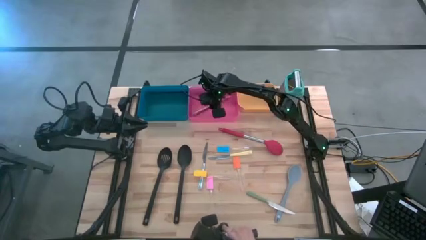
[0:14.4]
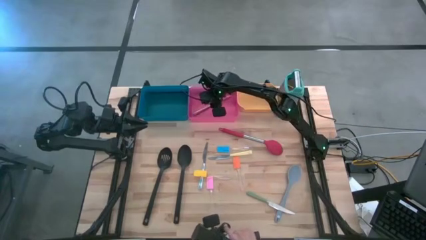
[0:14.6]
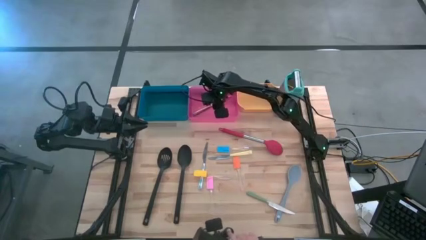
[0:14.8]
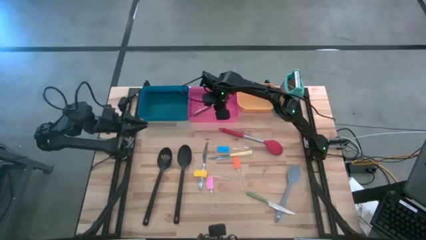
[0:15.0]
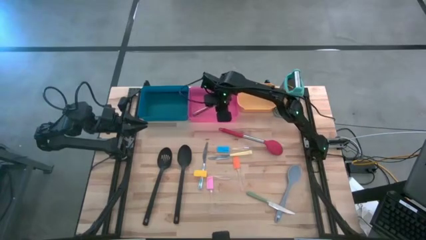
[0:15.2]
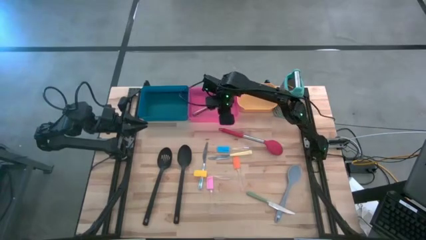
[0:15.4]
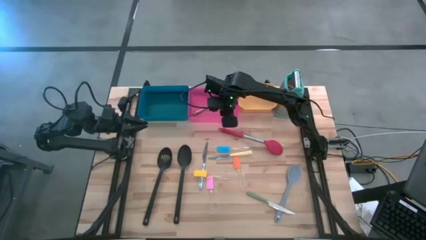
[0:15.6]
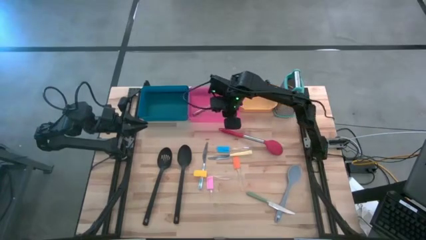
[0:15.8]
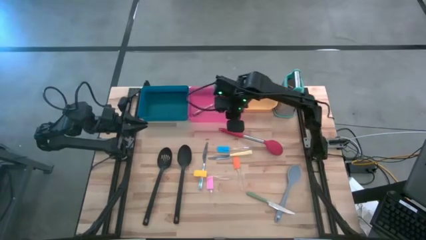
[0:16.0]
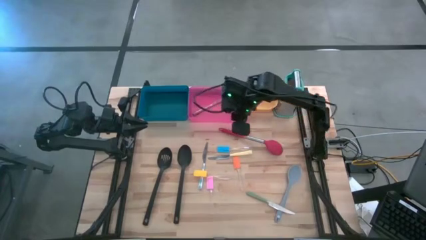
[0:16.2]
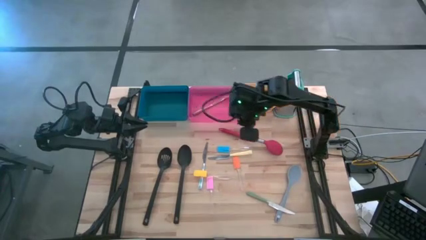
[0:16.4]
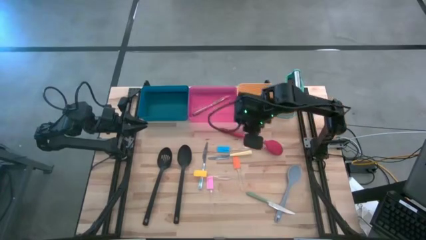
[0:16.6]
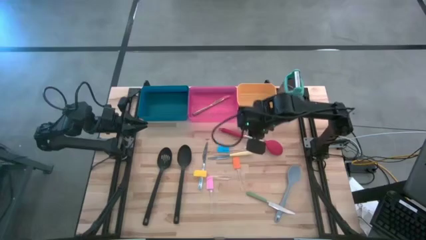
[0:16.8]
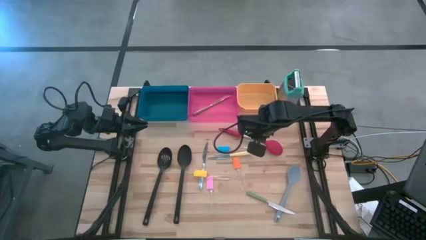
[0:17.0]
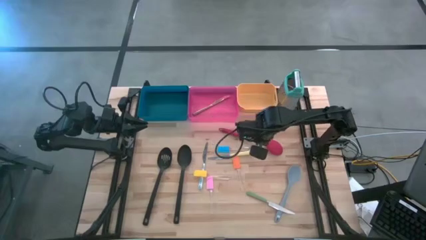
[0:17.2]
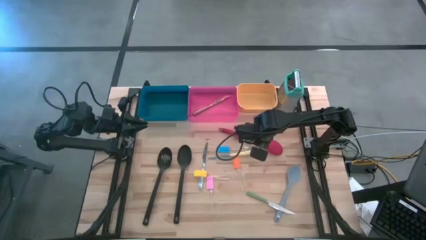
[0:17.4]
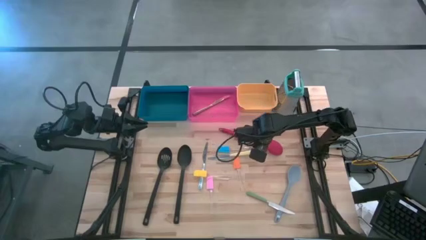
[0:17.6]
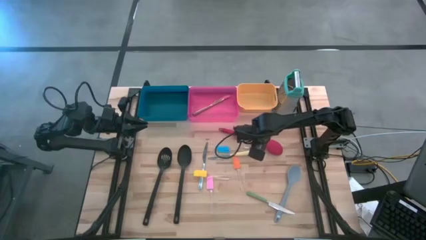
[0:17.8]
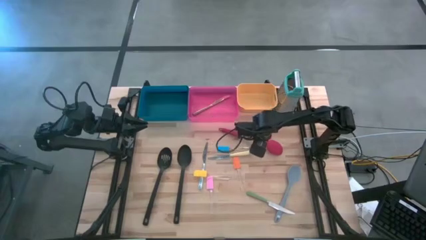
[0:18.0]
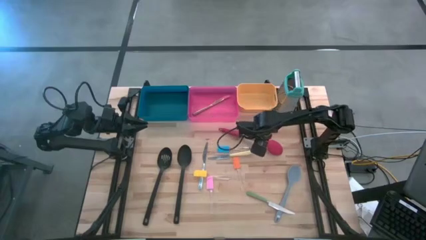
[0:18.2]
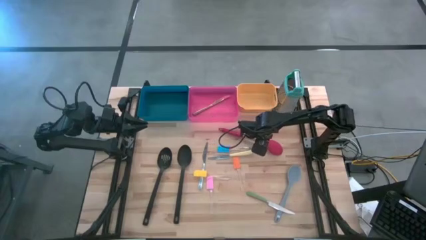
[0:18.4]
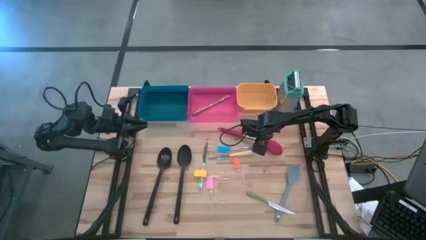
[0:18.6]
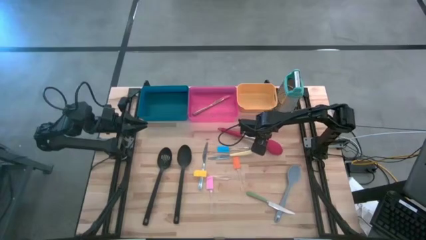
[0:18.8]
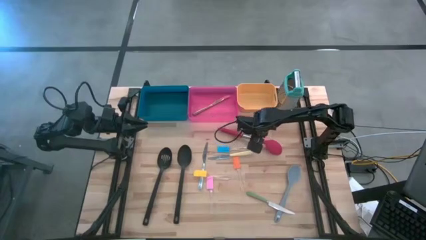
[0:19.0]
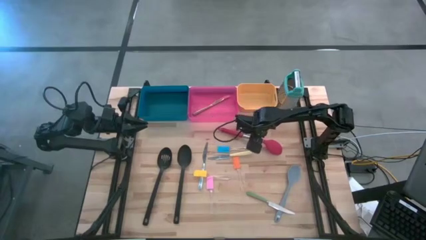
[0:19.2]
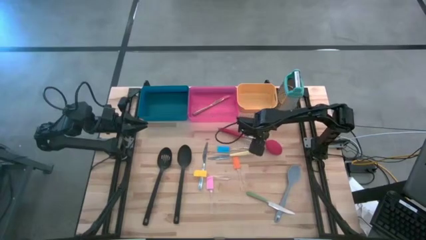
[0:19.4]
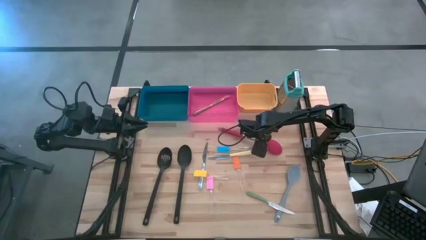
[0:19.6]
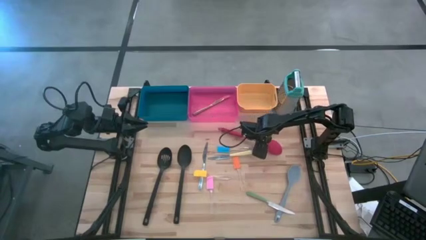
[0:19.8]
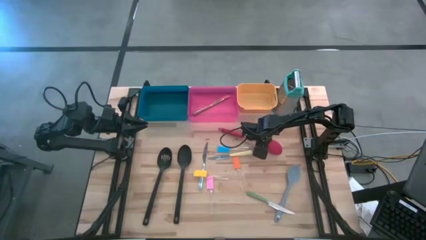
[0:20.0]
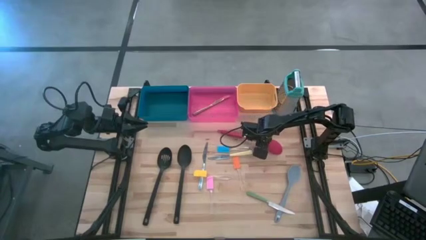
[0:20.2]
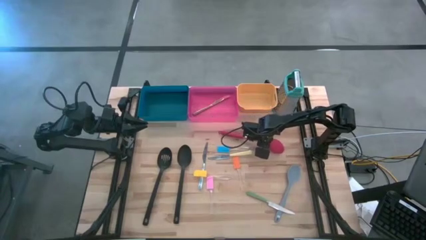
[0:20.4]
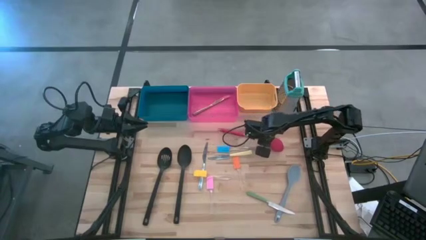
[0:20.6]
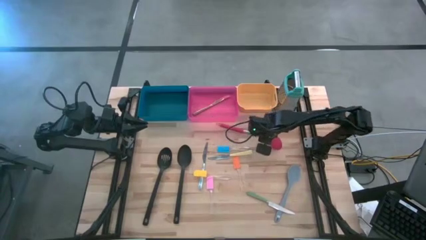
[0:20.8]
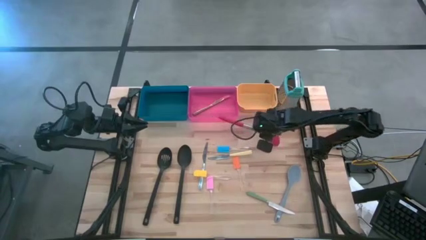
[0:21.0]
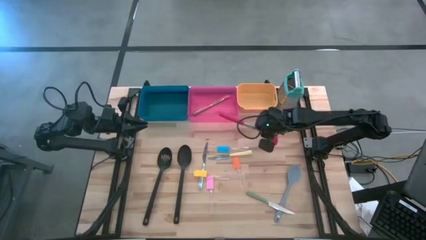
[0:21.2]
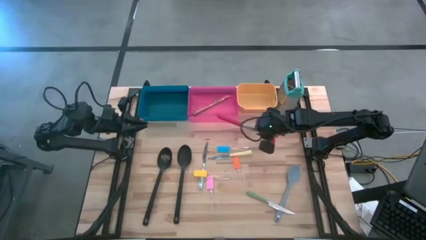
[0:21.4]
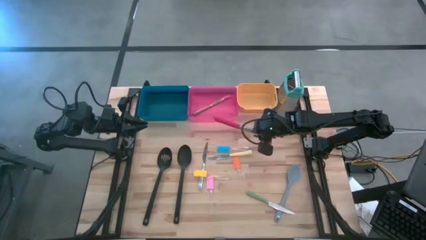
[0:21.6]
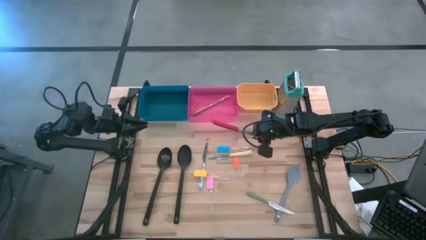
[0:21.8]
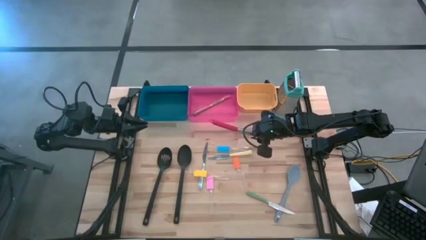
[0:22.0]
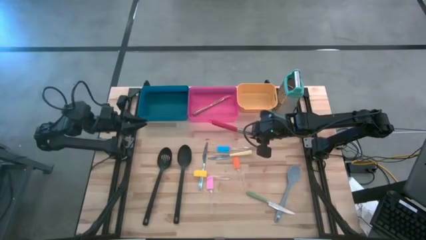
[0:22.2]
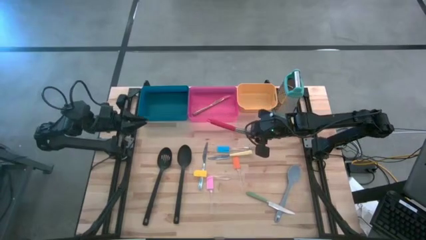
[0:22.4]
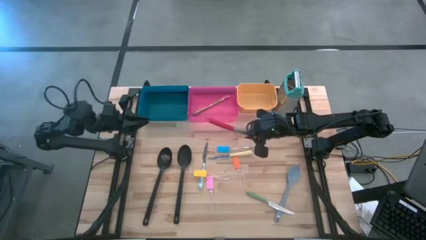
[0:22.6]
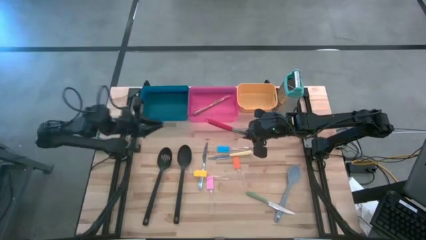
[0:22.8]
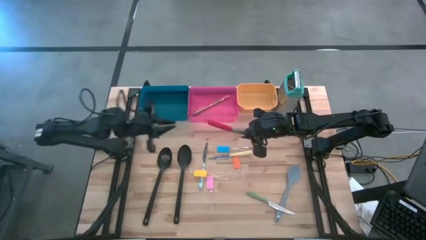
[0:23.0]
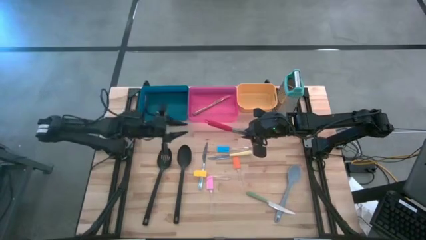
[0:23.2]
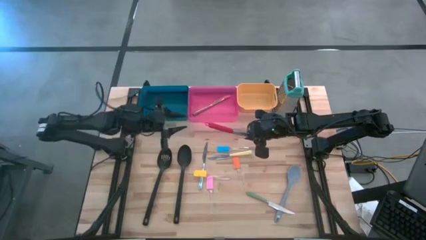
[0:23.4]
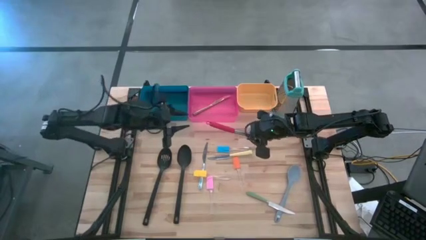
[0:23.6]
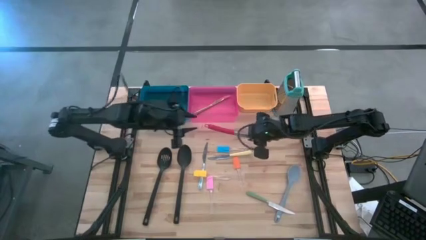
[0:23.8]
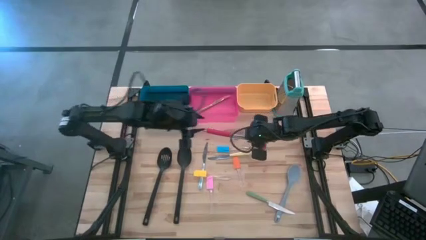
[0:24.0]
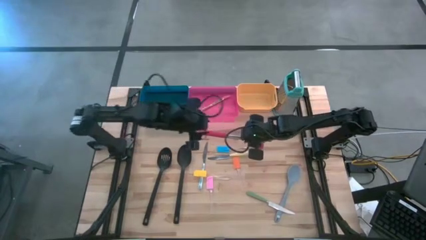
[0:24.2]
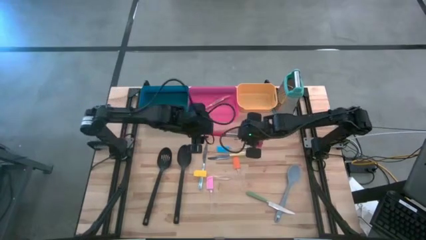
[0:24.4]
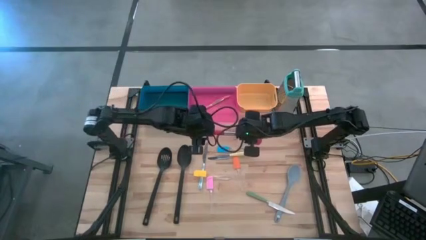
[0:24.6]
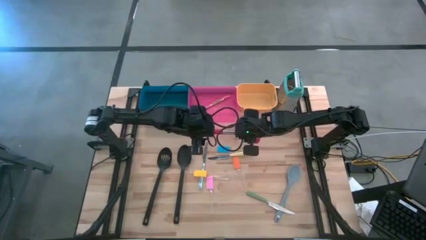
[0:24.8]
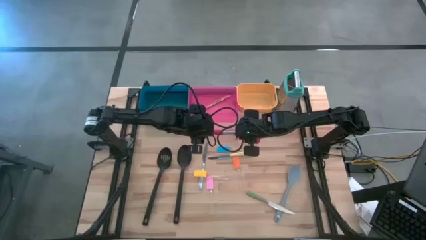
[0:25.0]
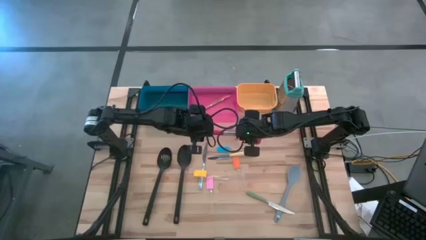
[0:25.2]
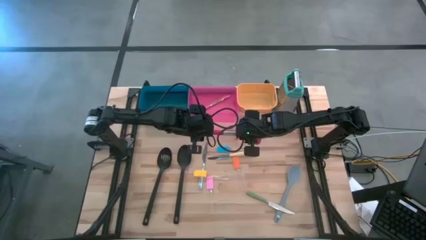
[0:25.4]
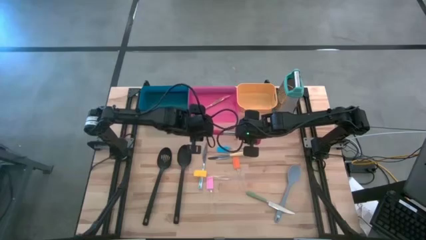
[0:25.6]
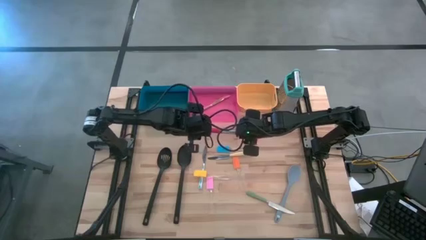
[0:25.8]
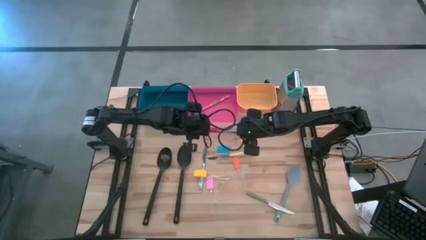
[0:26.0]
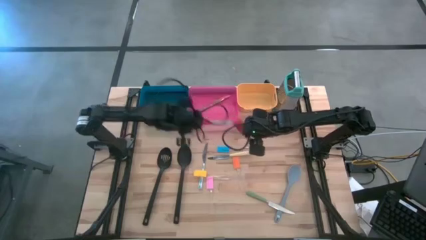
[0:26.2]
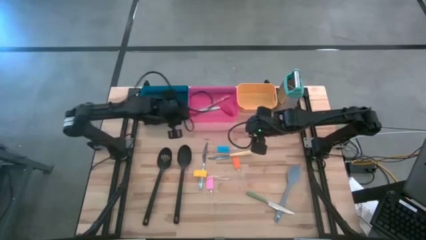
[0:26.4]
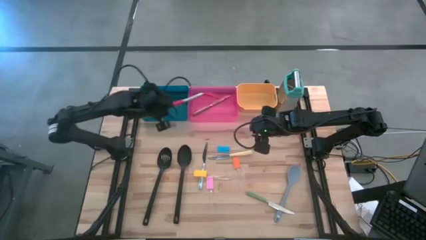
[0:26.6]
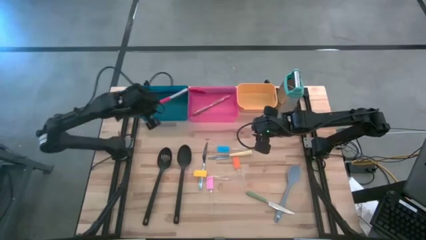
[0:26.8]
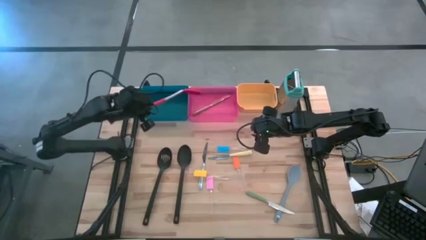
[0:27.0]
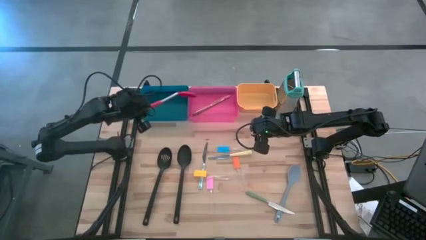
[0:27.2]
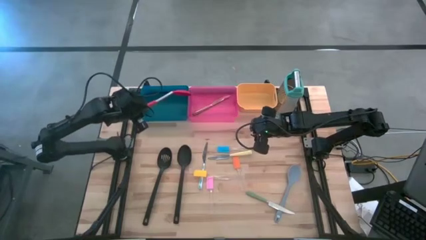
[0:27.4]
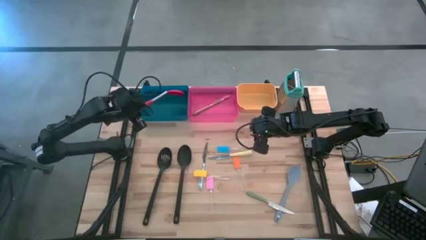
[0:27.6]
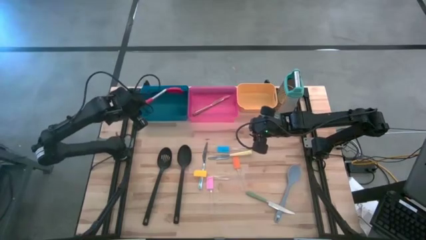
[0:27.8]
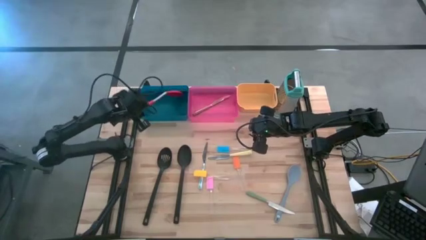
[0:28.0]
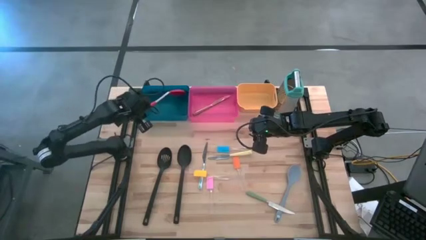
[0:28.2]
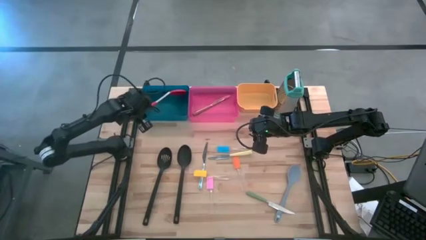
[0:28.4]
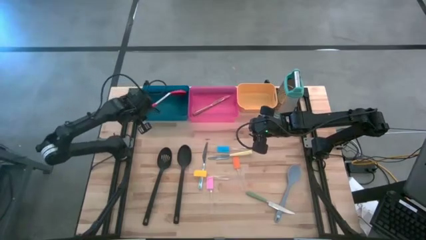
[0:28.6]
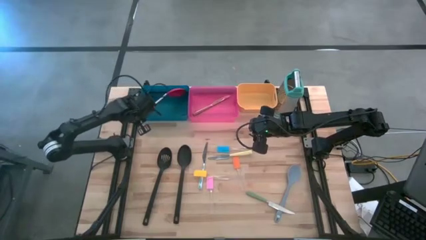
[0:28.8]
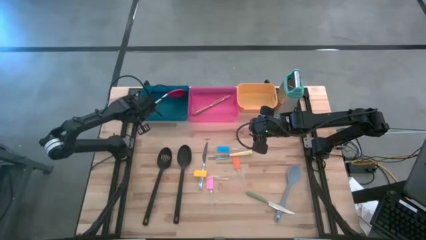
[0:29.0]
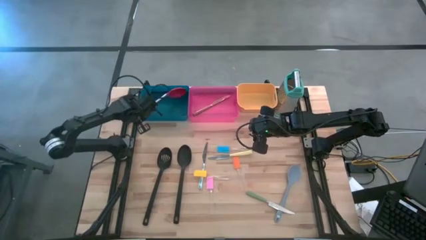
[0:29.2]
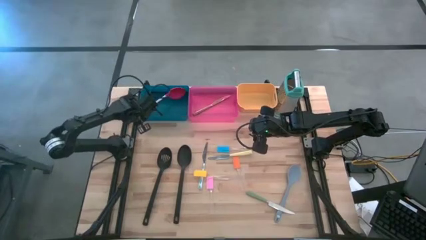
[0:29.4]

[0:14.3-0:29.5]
Task: Pick & Place Kitchen Items
Put the red serving spoon into the blue bin
